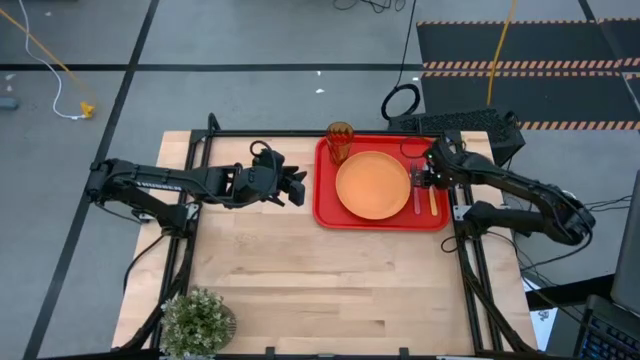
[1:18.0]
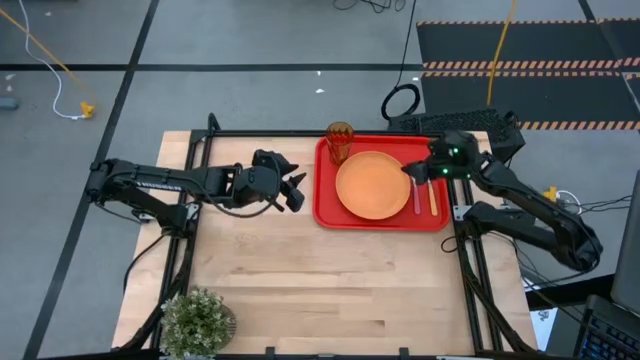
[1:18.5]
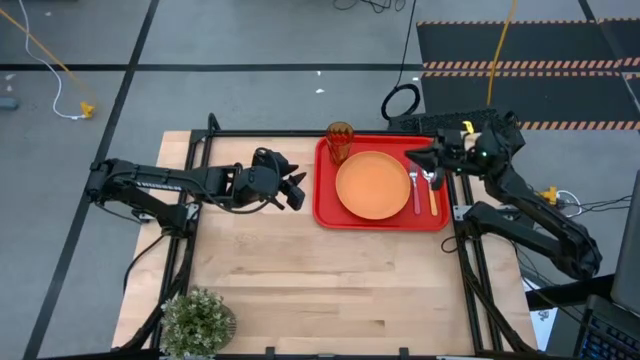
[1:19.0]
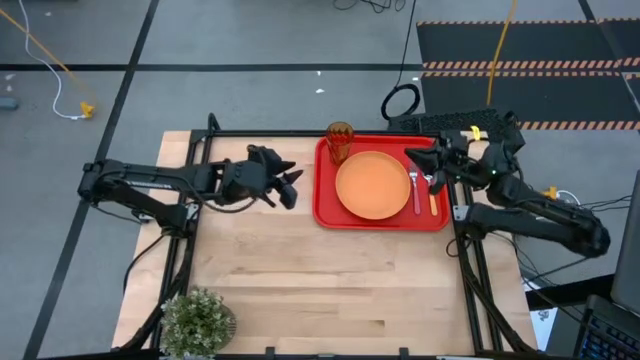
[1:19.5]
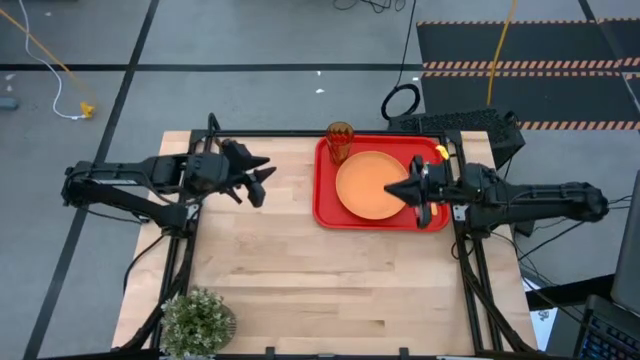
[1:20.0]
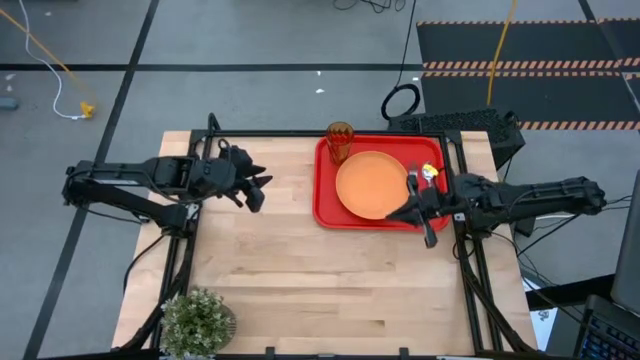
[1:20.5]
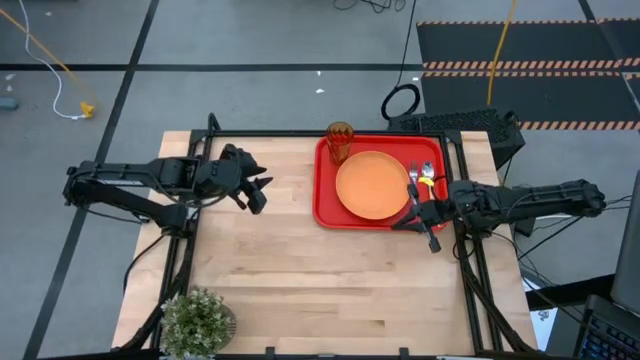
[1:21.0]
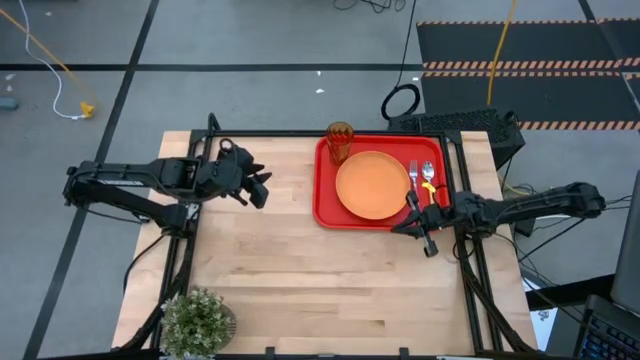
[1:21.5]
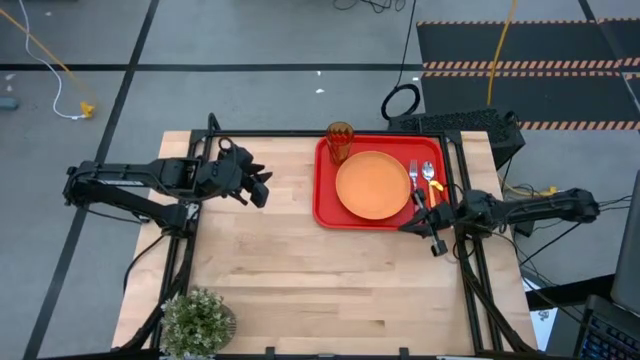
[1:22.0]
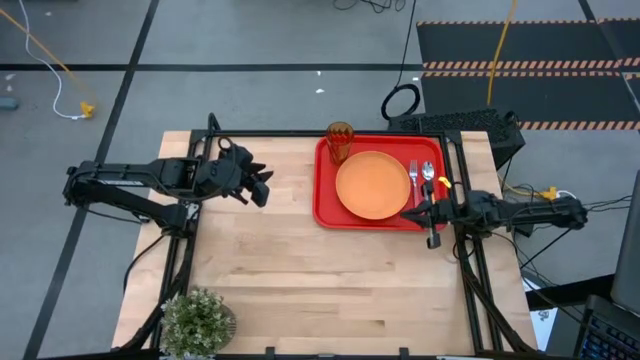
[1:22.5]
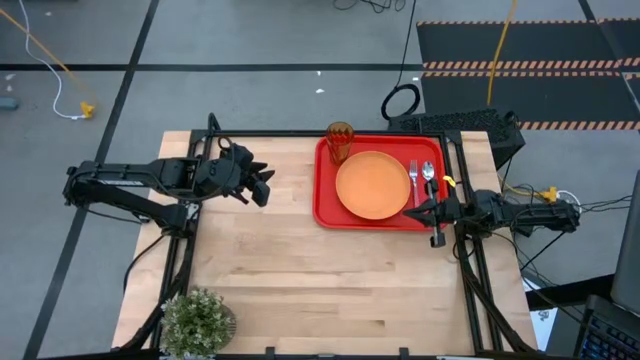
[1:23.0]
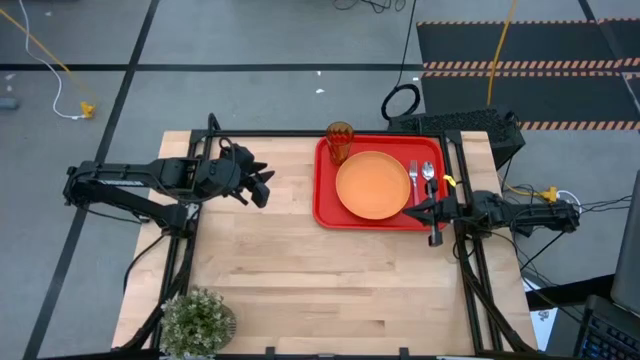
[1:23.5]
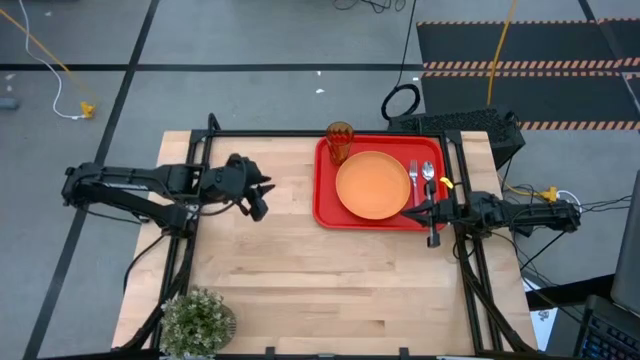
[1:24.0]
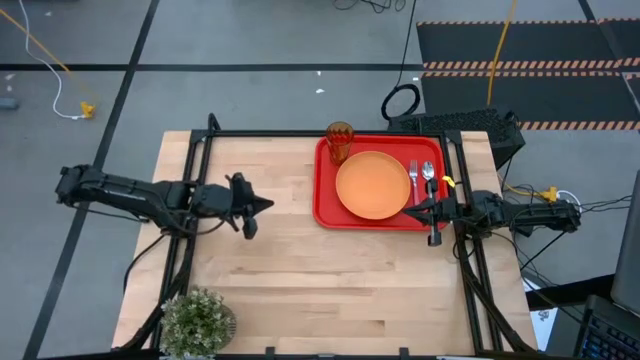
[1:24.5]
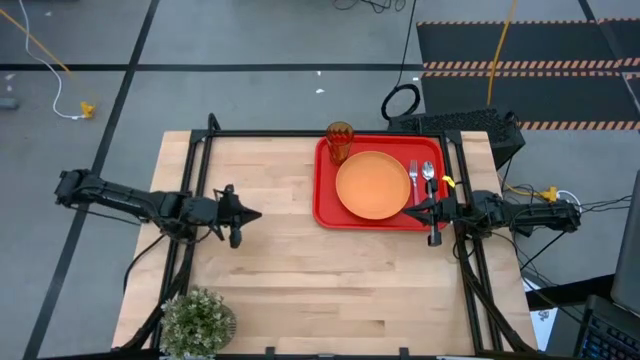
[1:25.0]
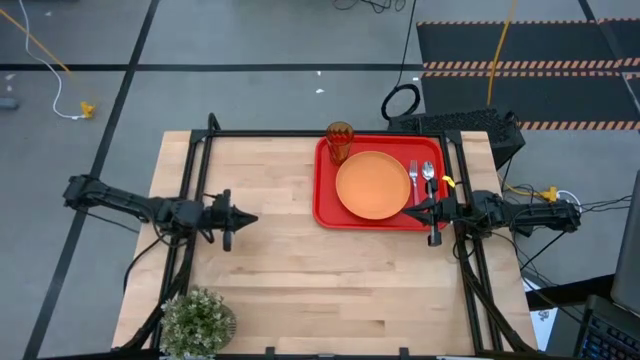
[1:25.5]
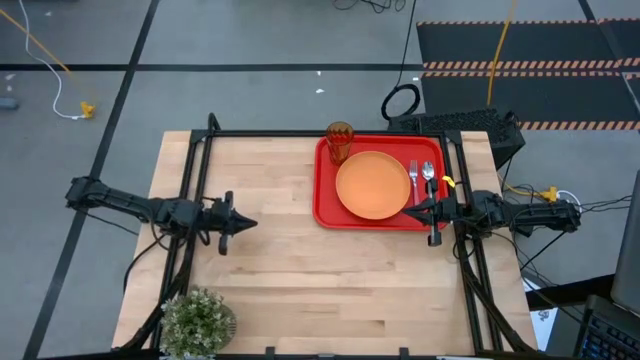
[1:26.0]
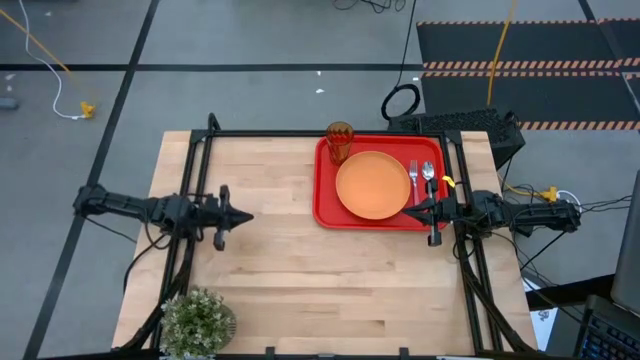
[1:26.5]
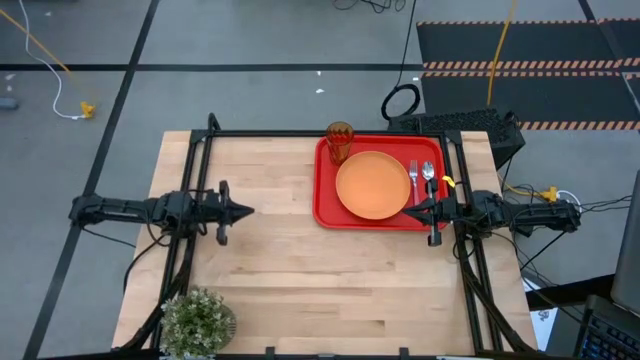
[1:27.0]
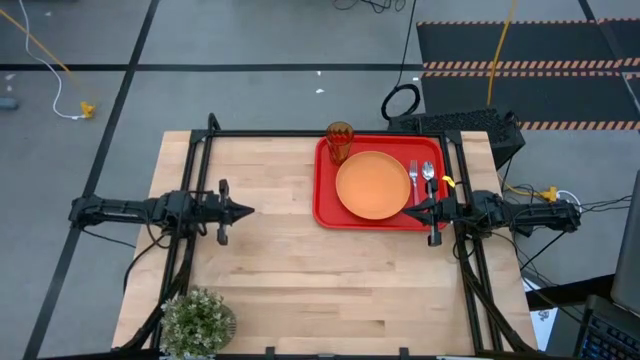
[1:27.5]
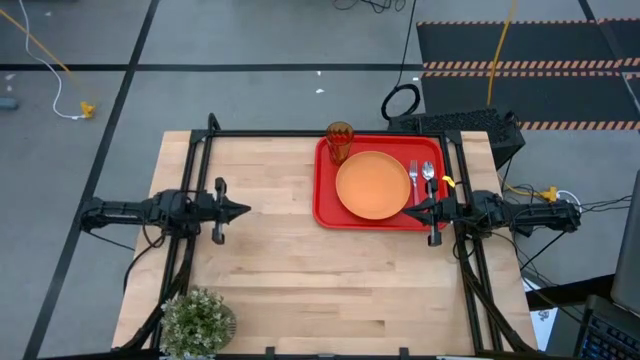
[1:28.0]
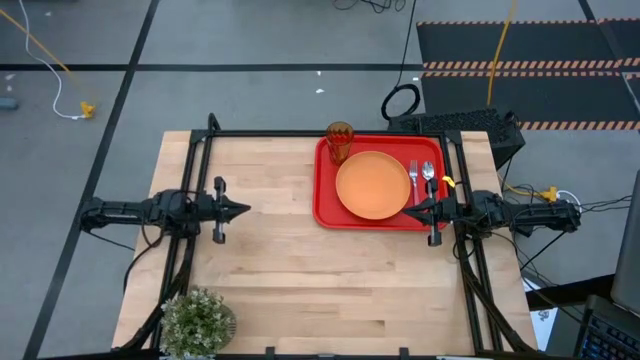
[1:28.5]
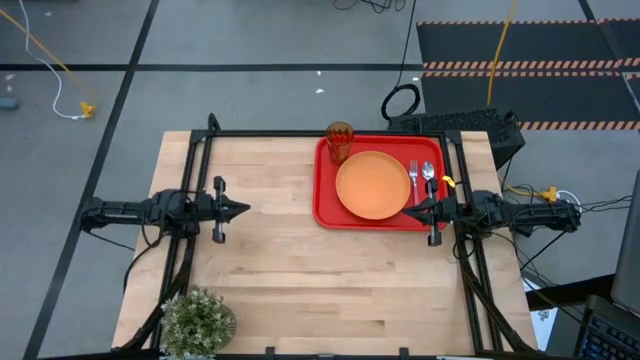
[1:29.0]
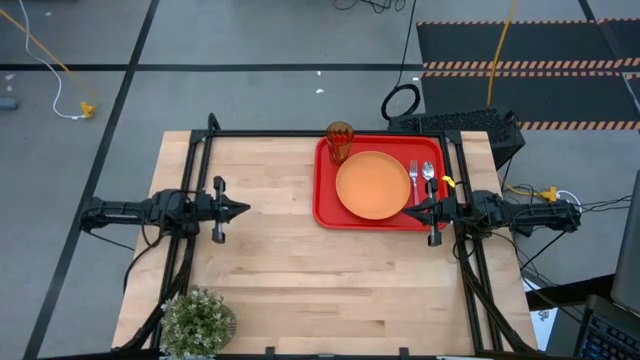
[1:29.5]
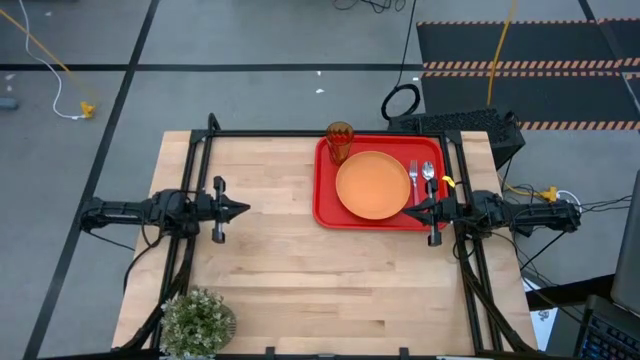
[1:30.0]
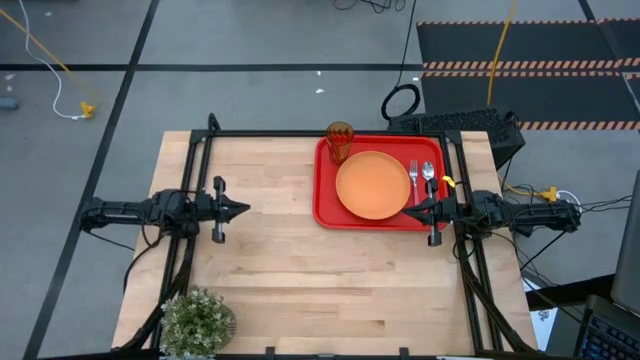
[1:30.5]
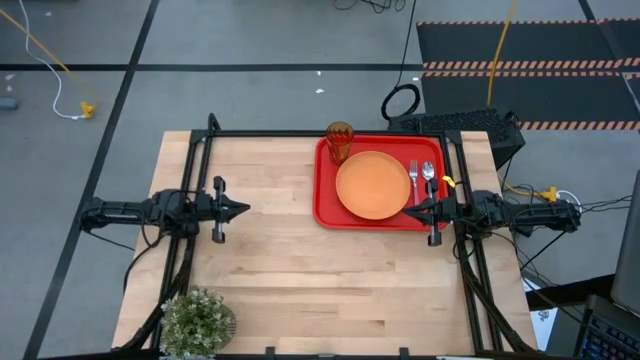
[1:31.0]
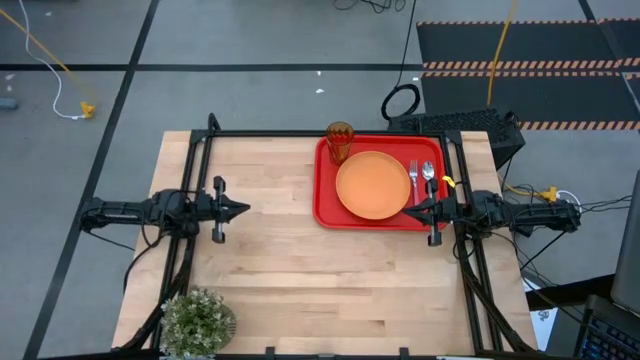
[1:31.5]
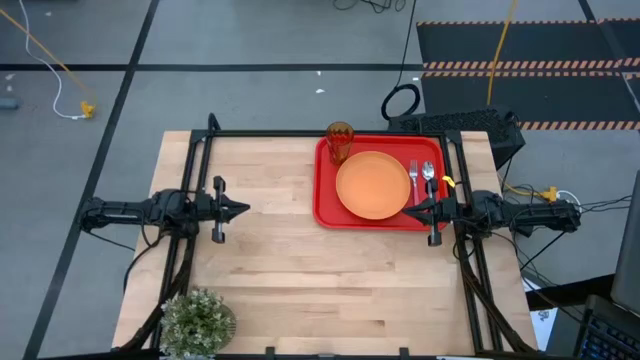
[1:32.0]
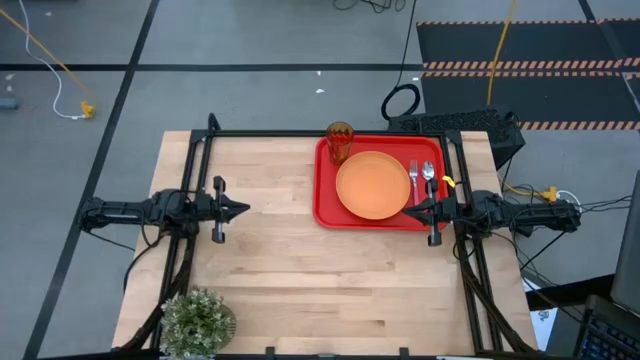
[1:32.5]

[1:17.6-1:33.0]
Task: Pick and place plate/cup/fork/spoon on tray
Return to Home Position

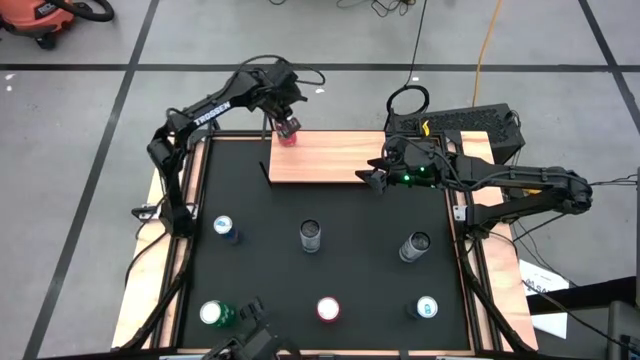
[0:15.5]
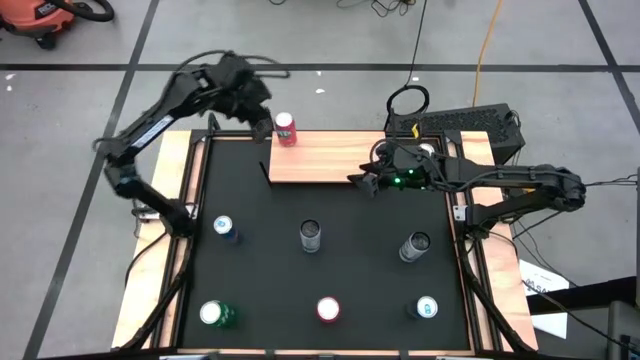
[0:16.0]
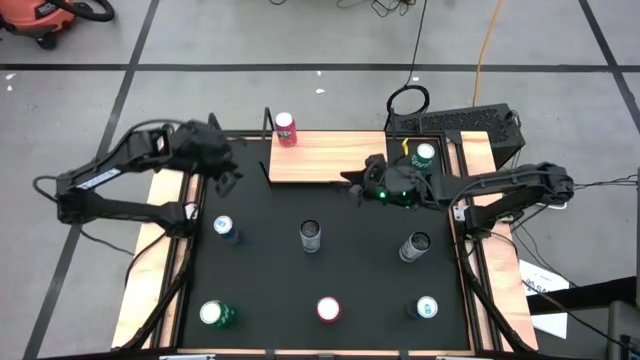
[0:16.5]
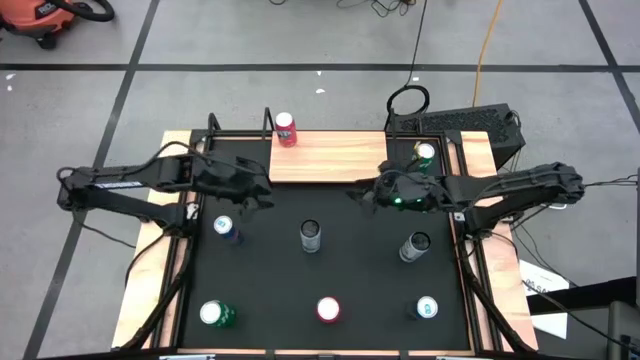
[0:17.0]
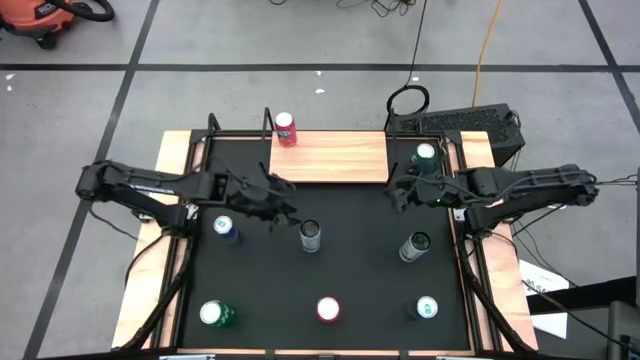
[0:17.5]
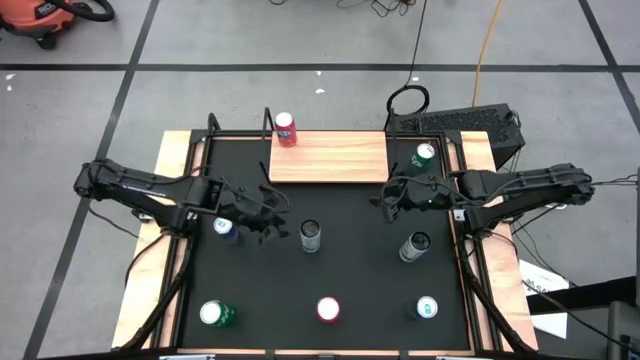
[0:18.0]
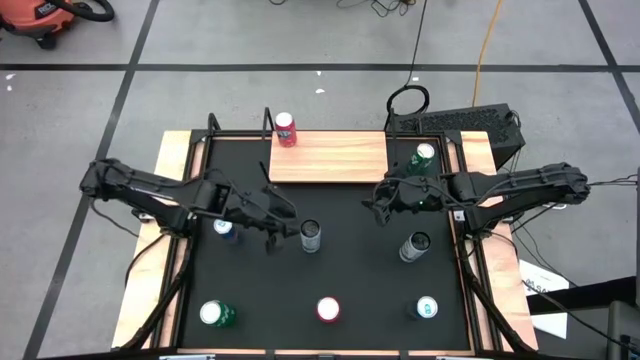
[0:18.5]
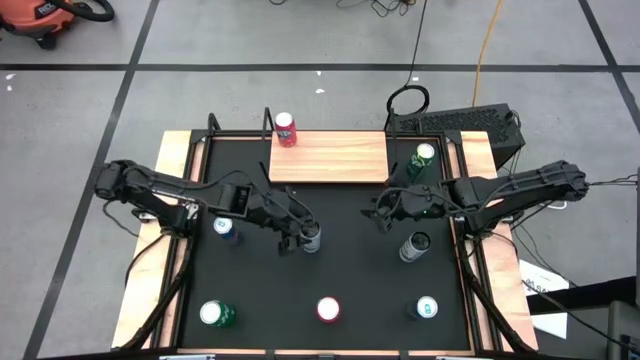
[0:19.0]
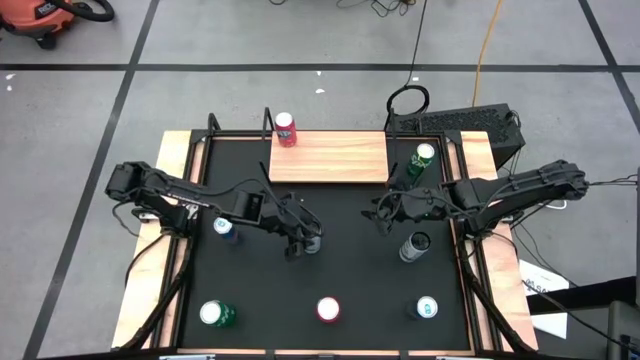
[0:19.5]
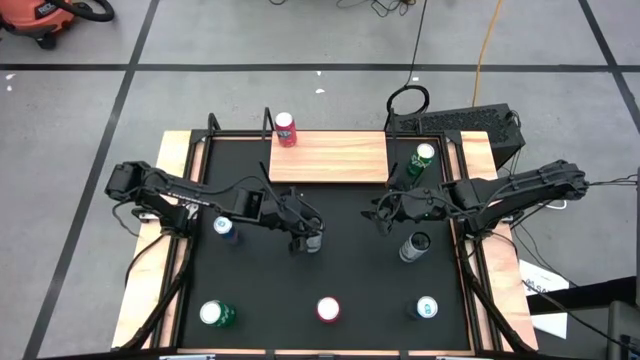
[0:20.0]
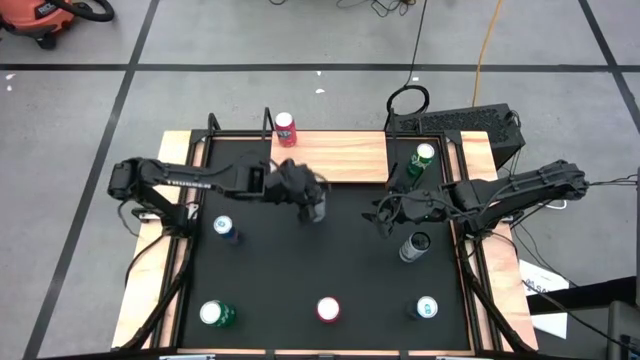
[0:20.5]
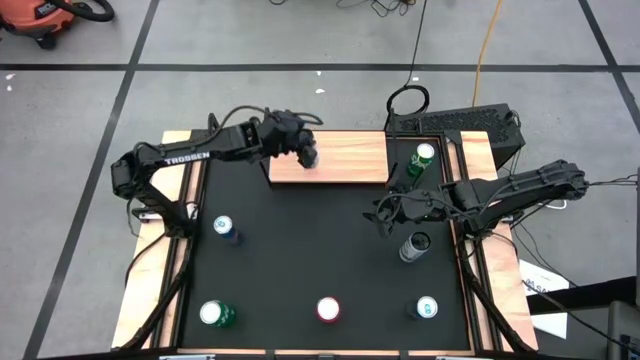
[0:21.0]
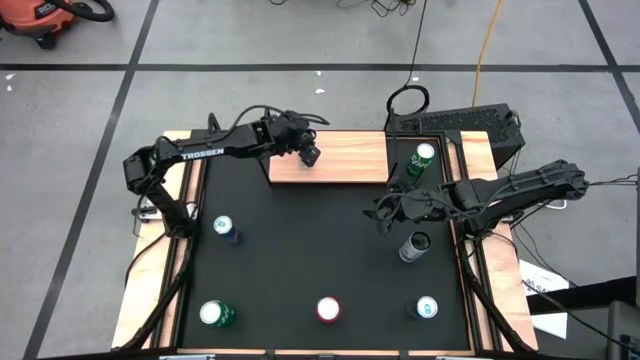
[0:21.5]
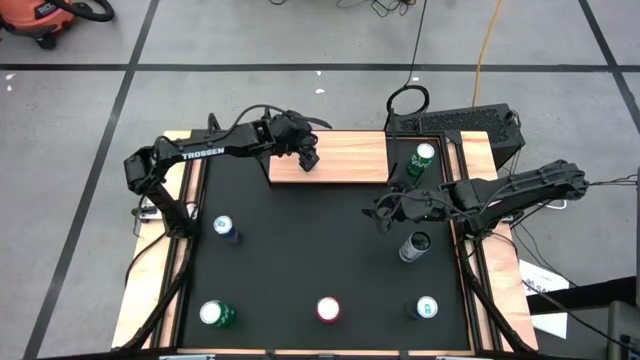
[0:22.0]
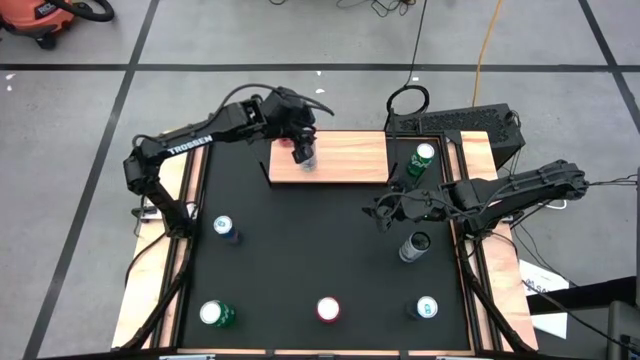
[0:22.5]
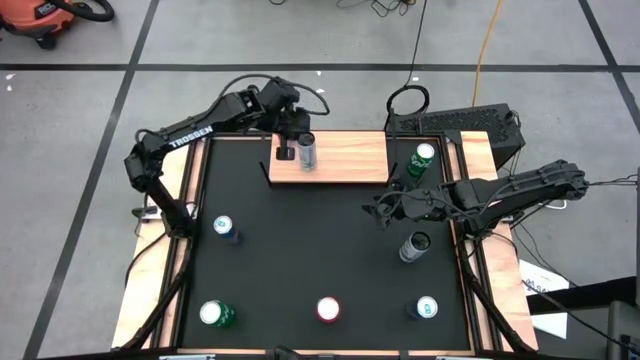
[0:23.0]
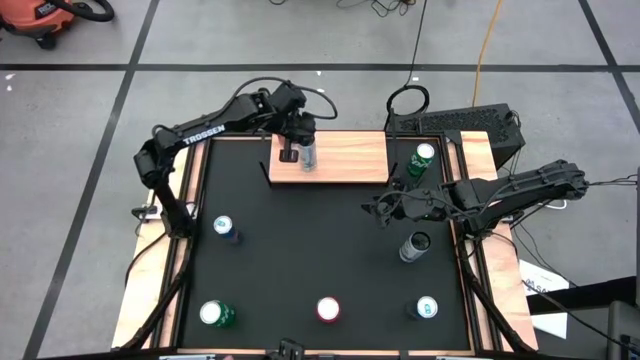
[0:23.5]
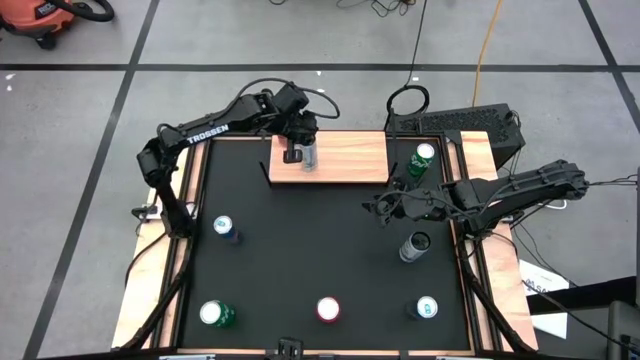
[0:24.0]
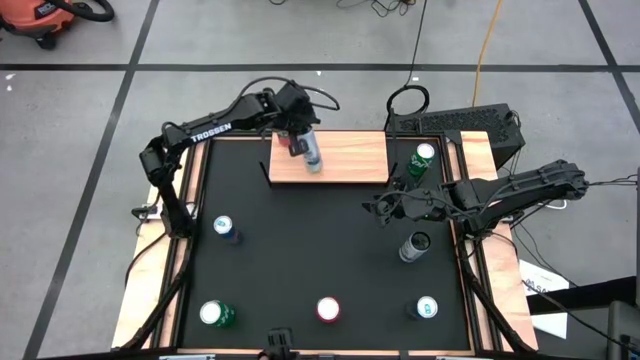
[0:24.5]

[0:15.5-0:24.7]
Task: Place canned beverage on shelf
Put the left white-blue soda can on the shelf
